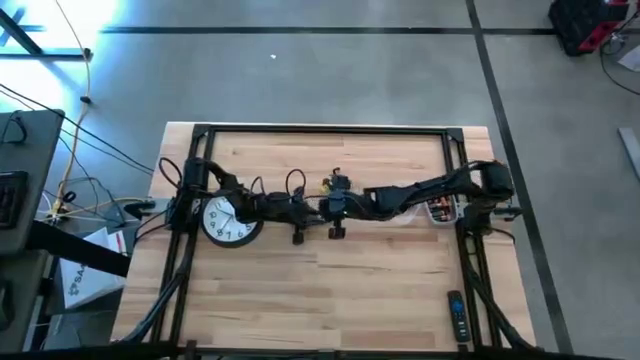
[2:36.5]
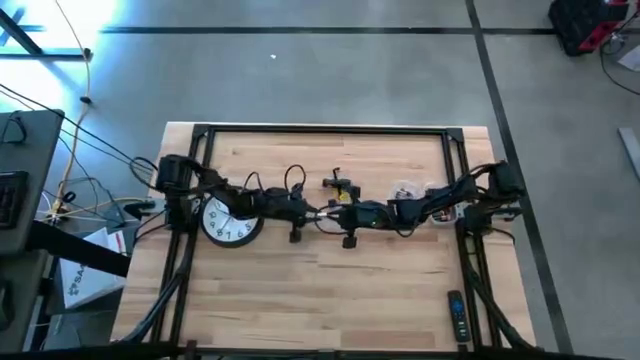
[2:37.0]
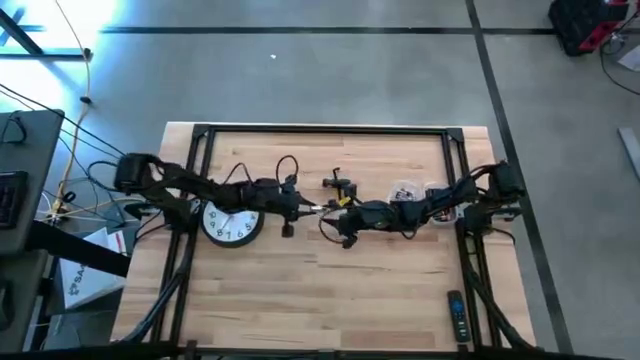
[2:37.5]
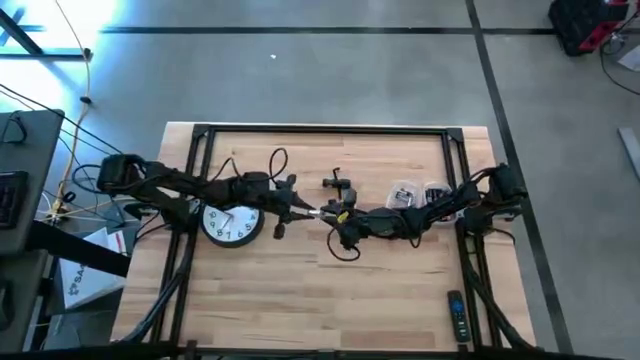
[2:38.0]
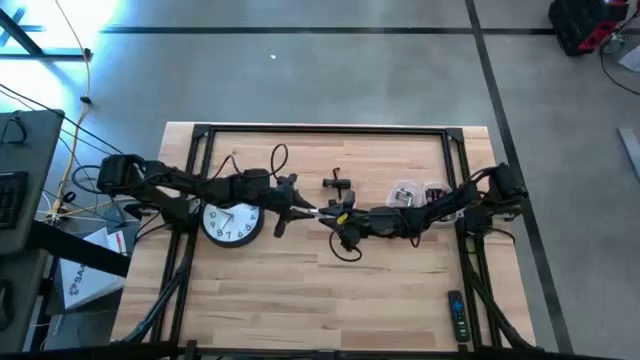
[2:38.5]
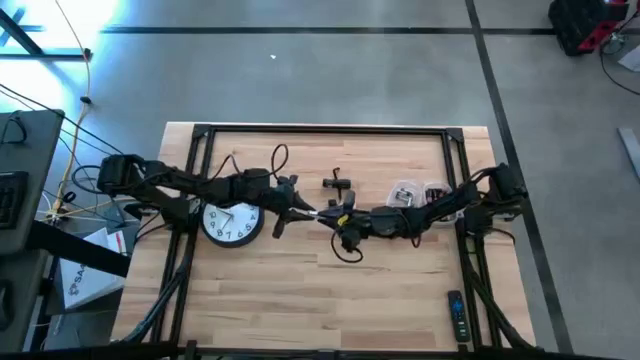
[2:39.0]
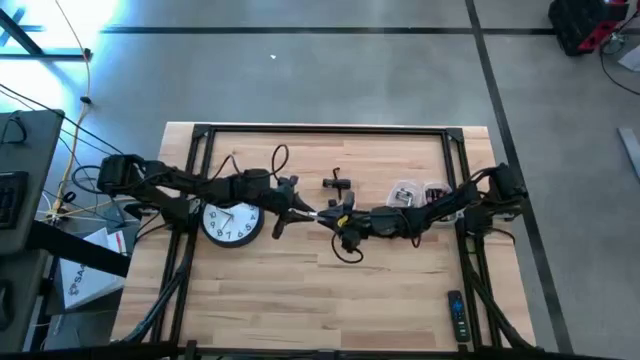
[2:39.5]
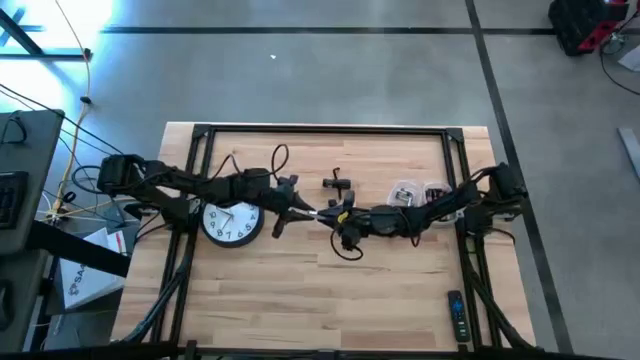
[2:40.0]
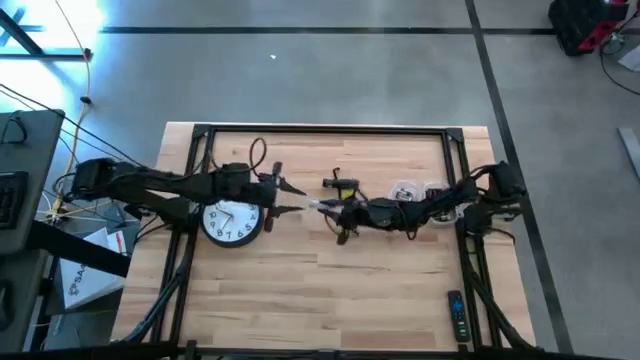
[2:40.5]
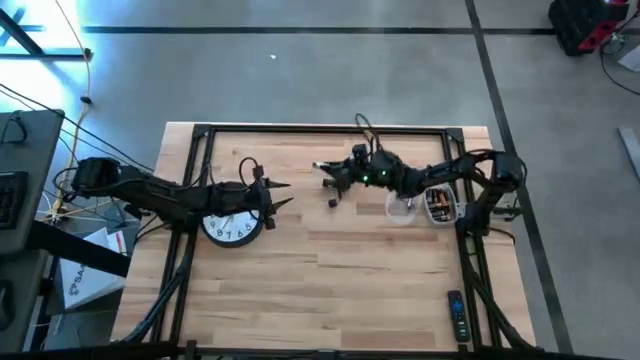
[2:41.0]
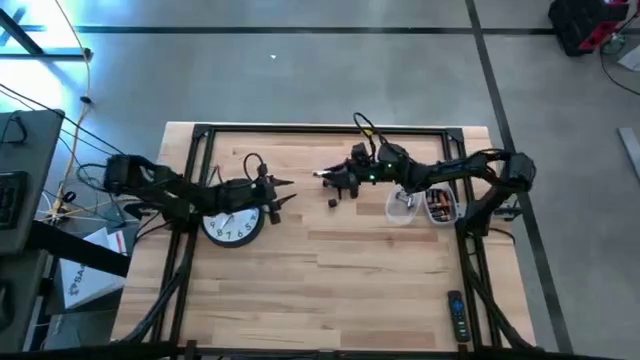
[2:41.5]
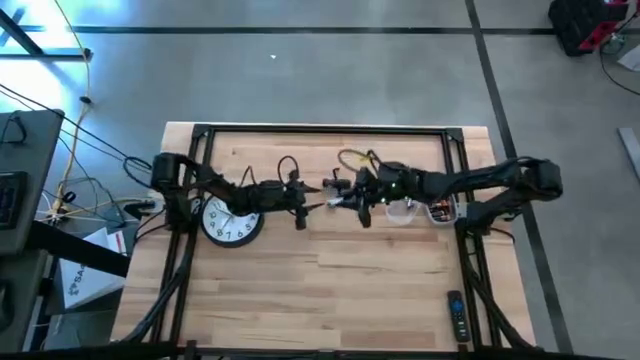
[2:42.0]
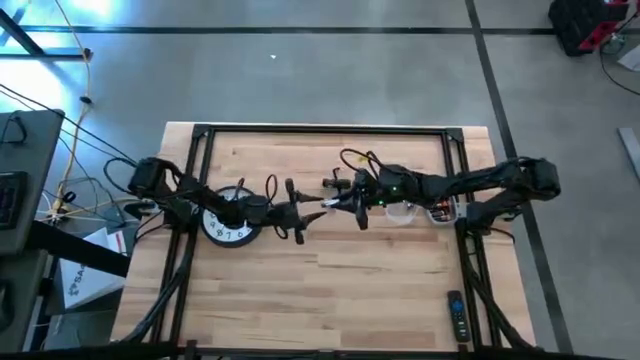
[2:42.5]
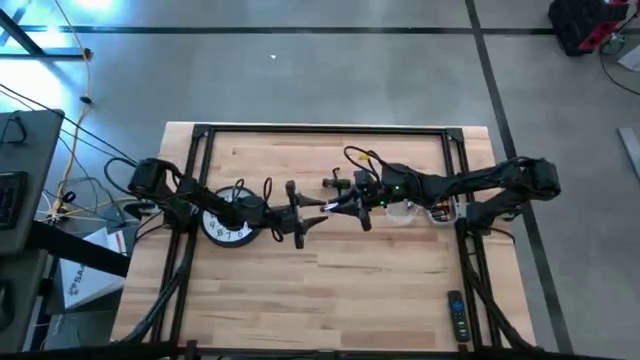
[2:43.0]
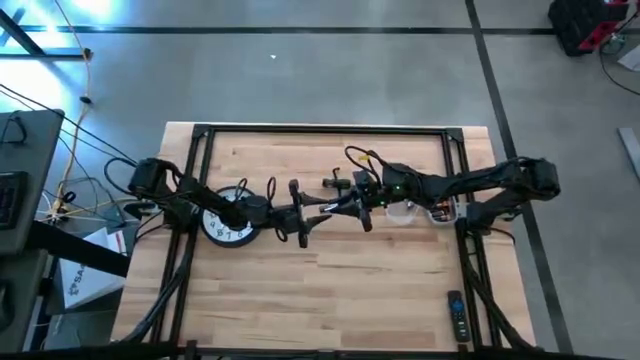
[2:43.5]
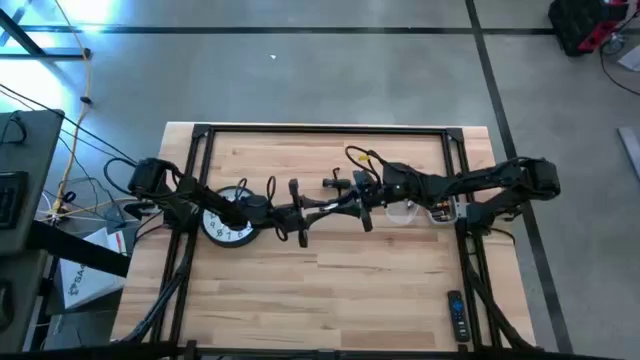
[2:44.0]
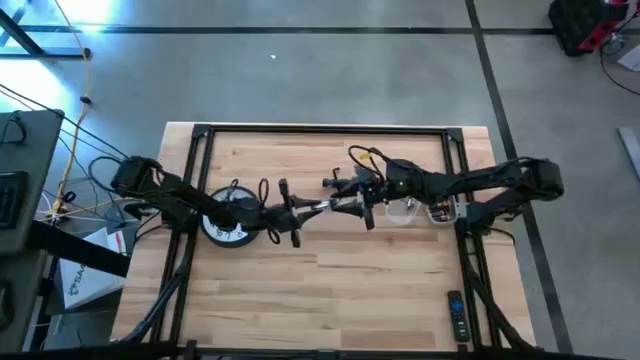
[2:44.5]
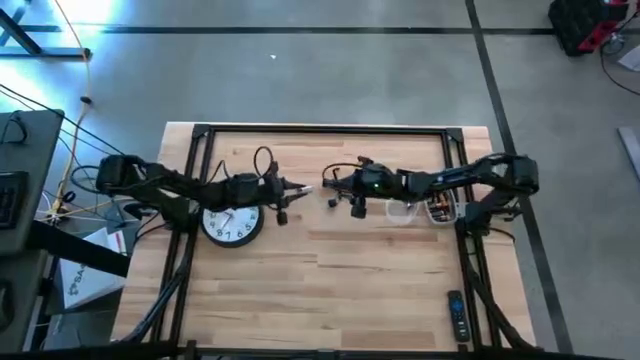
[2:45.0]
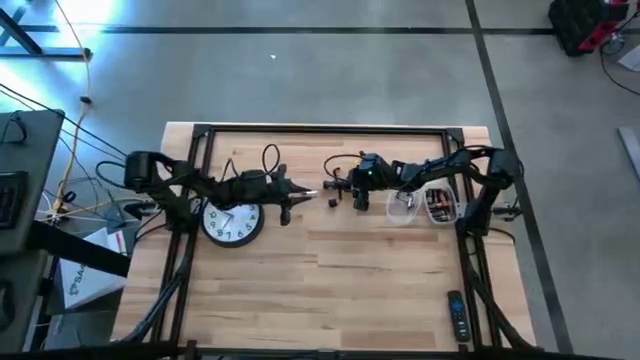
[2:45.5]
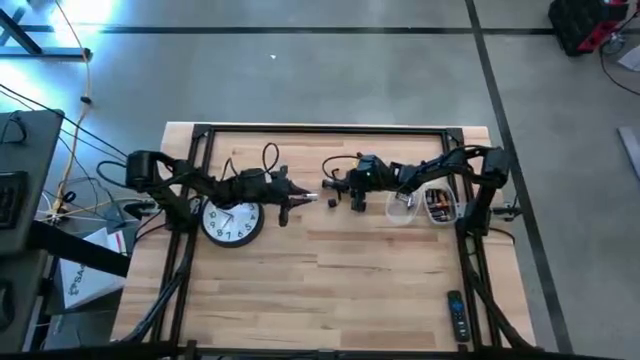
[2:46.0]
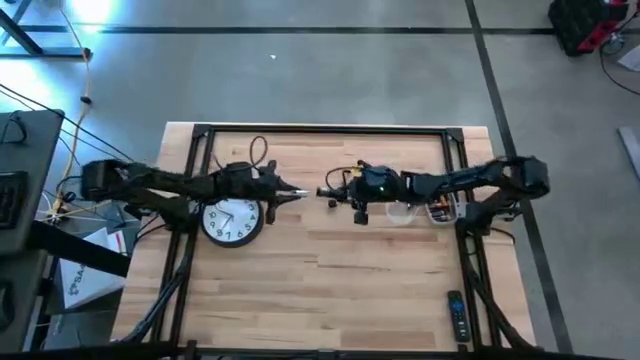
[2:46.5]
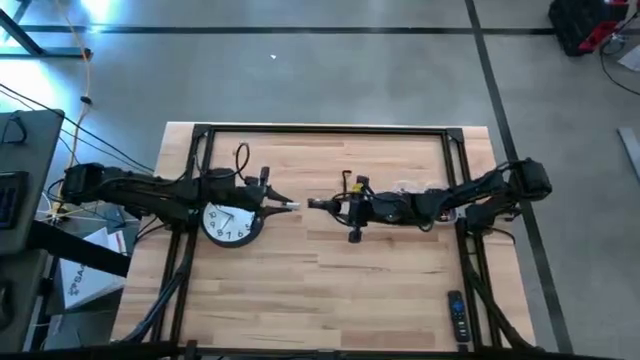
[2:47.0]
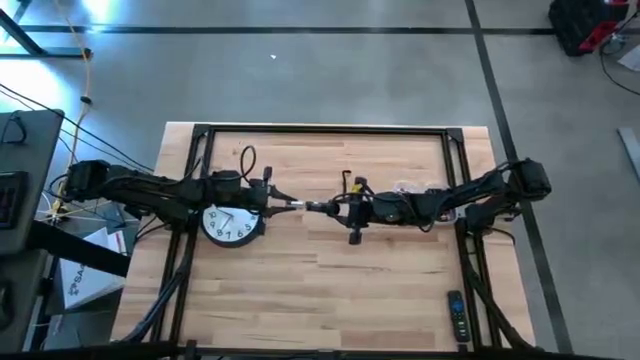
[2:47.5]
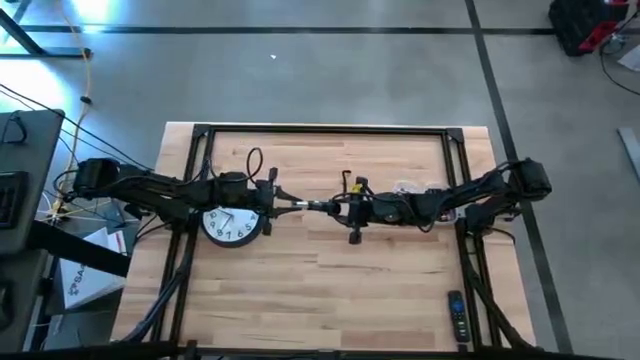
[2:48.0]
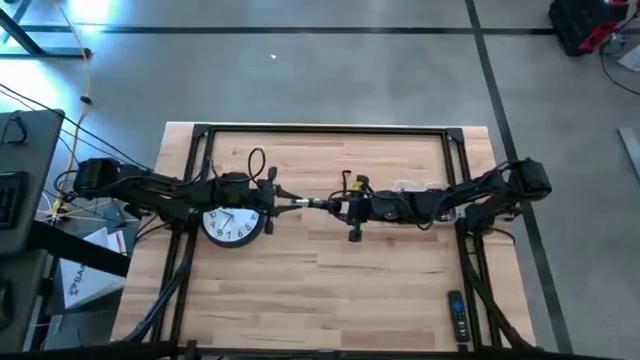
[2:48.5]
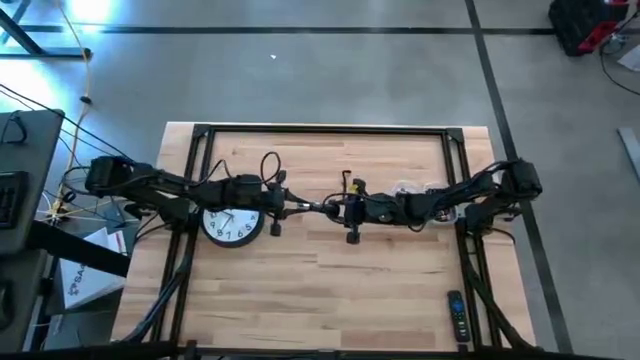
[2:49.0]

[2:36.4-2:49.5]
Task: Insert battery
Insert the white battery case into the black flashlight

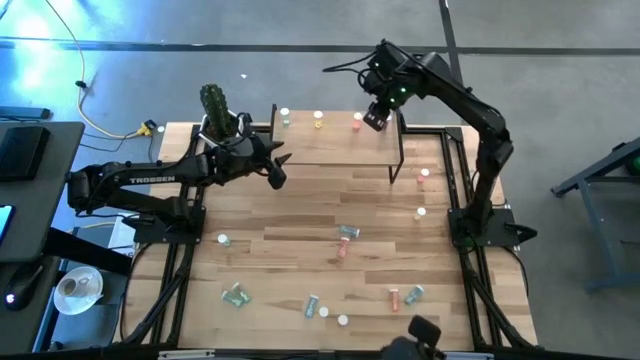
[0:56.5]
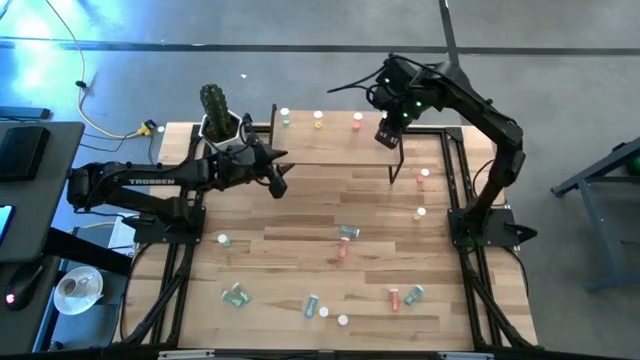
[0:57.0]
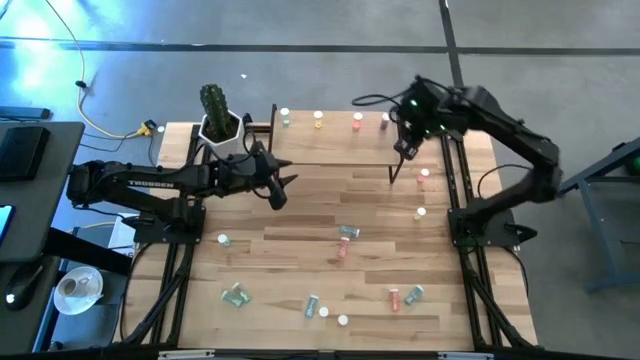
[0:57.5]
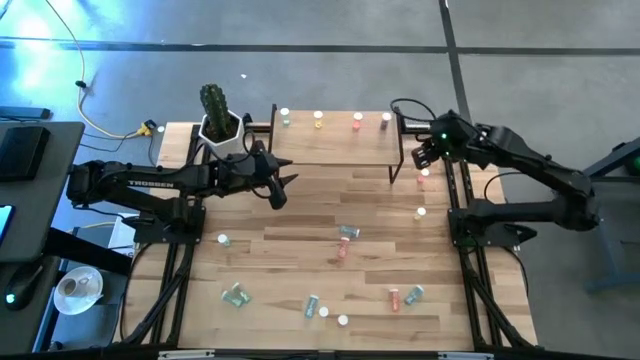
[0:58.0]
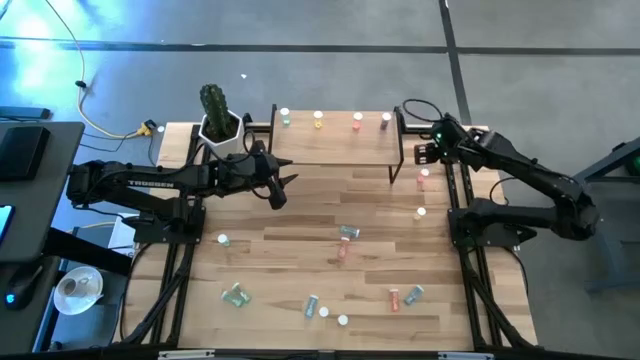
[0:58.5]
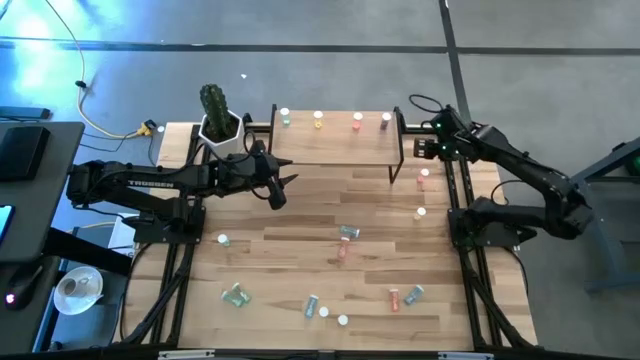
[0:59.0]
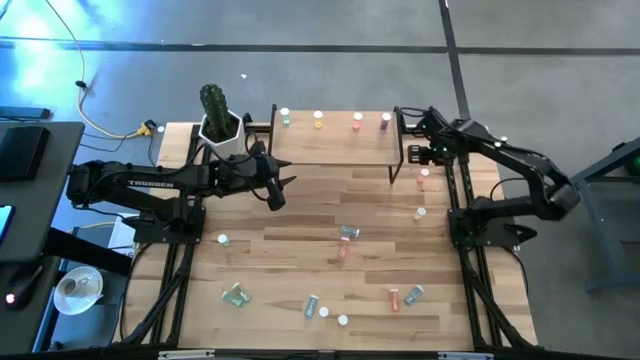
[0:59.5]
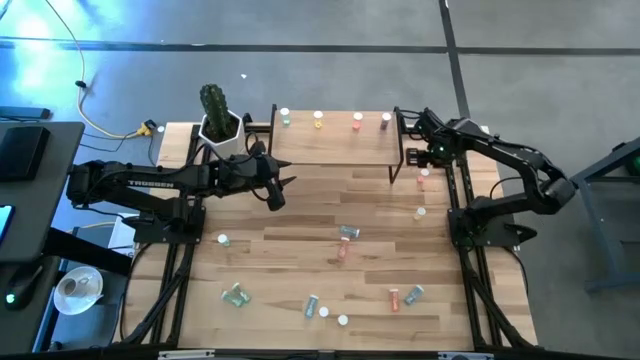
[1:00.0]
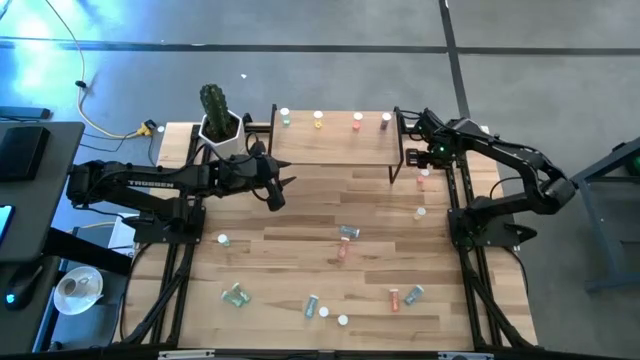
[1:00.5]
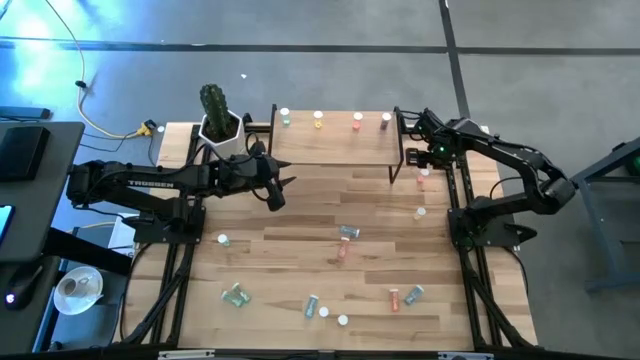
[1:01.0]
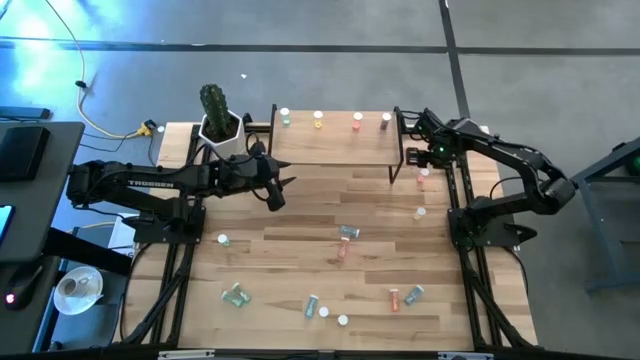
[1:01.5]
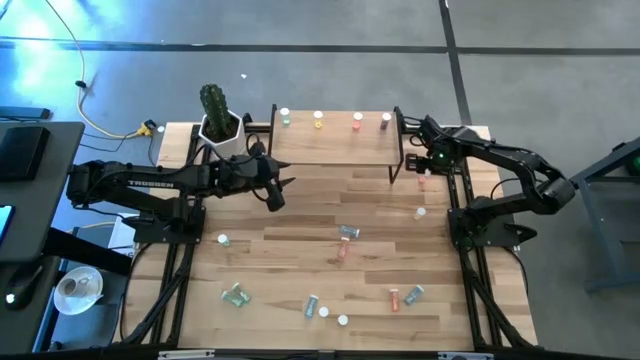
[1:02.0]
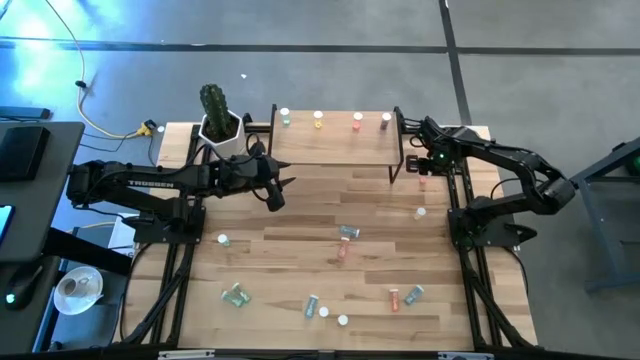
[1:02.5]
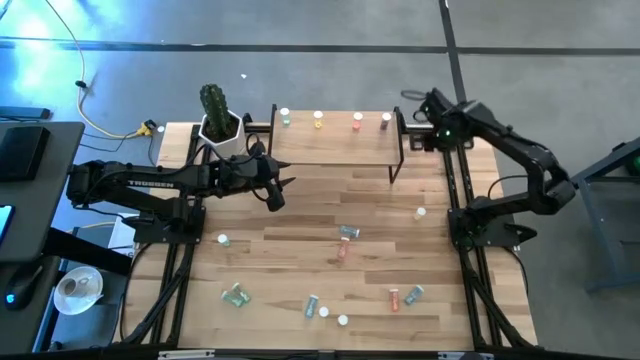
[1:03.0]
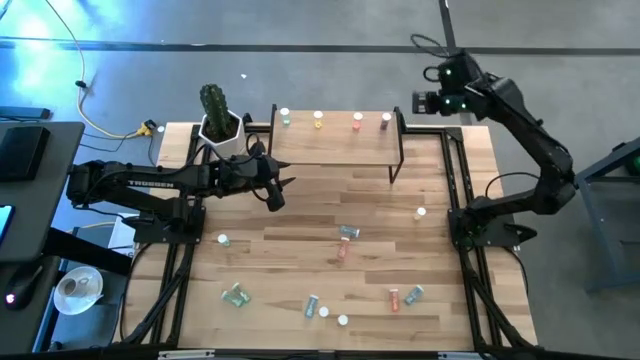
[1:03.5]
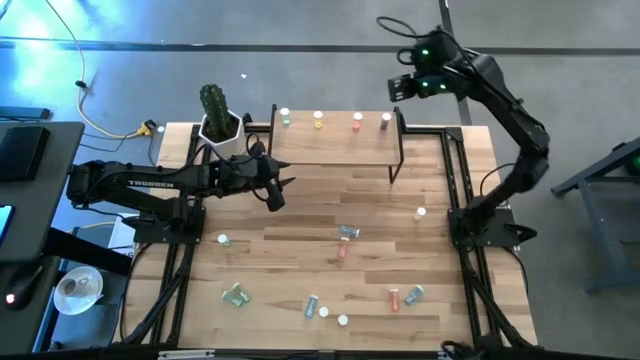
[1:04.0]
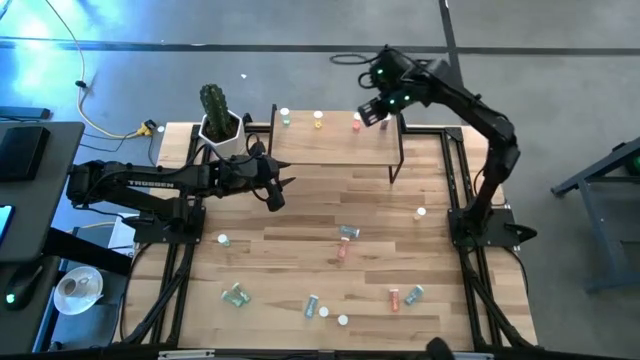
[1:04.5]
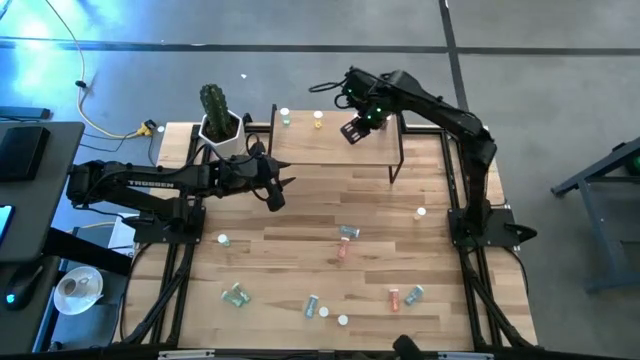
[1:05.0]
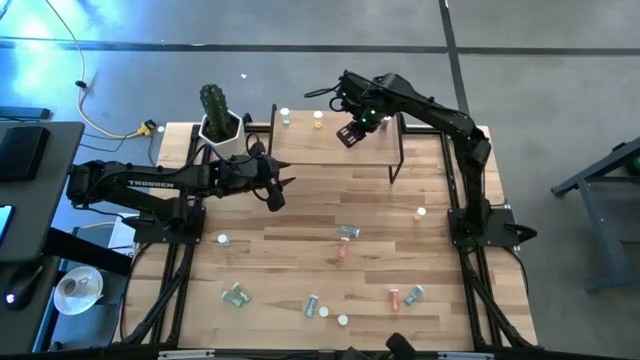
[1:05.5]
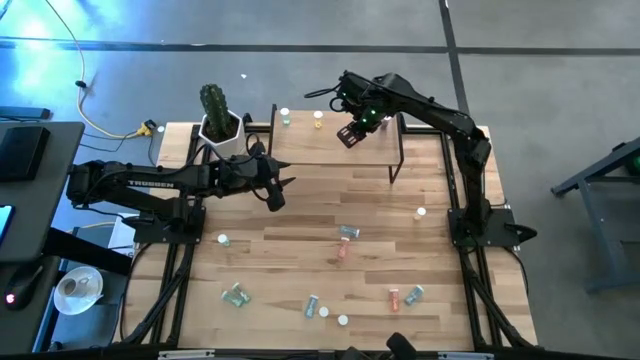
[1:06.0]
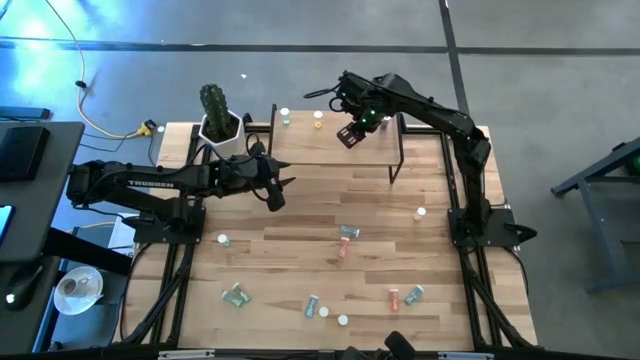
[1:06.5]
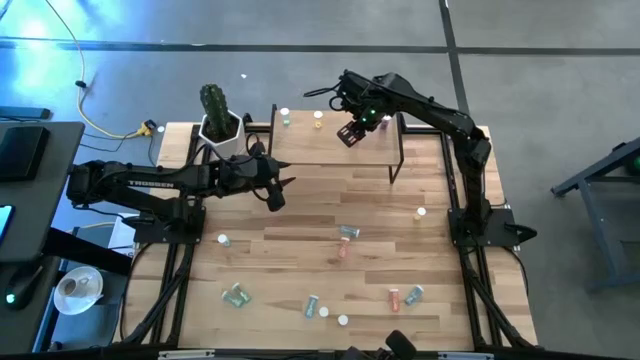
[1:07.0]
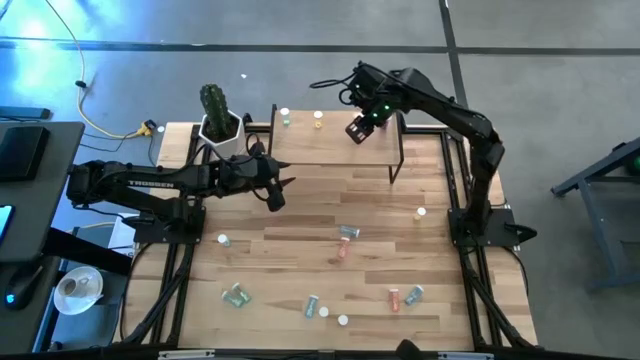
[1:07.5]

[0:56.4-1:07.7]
Task: Pick and place medicine bottles onto shelf by color
Put the orange pill bottle on the shelf aligned with the other orange pill bottle
